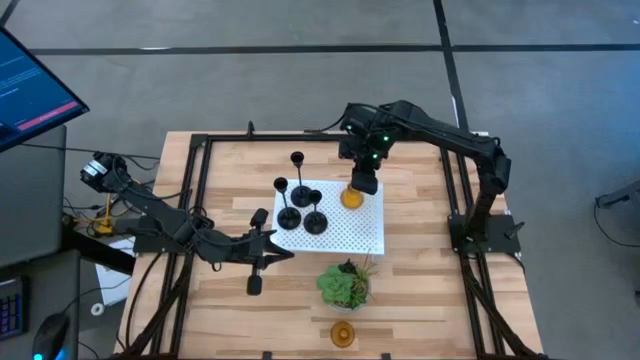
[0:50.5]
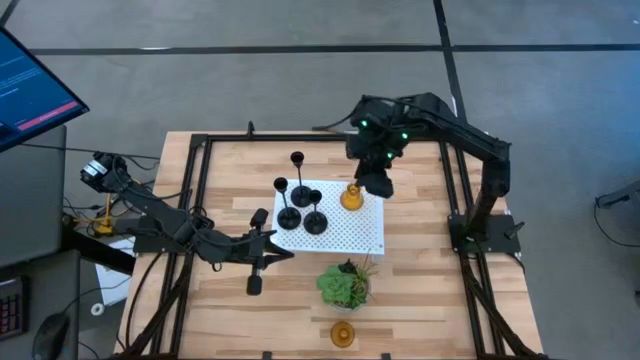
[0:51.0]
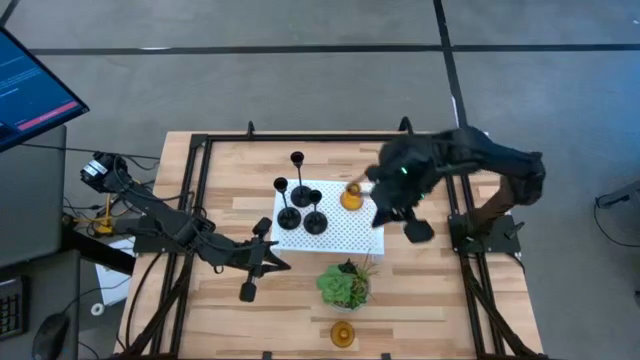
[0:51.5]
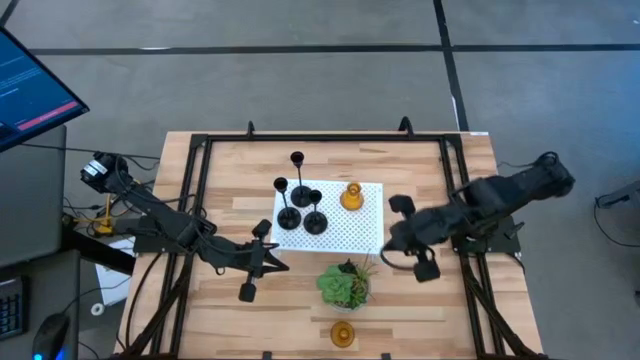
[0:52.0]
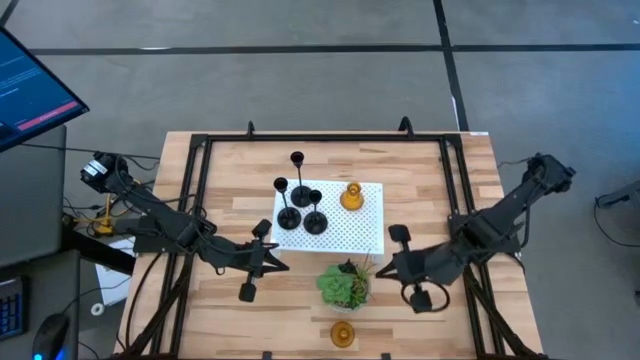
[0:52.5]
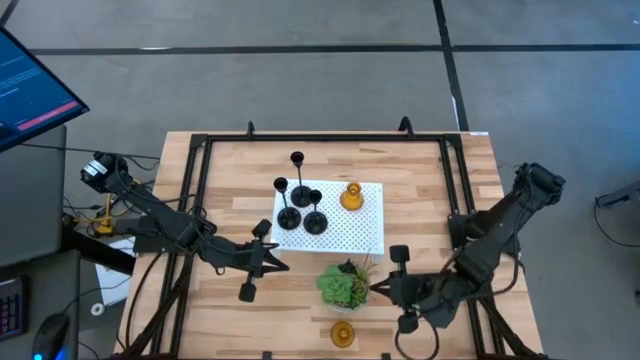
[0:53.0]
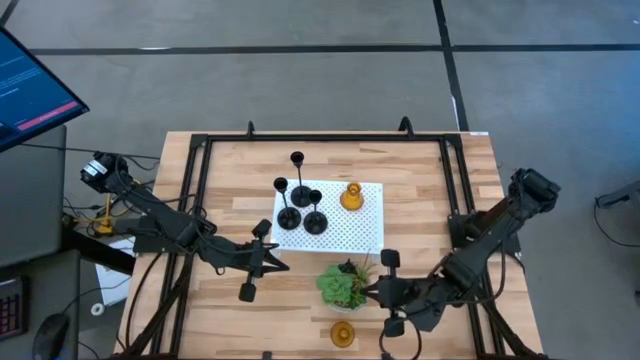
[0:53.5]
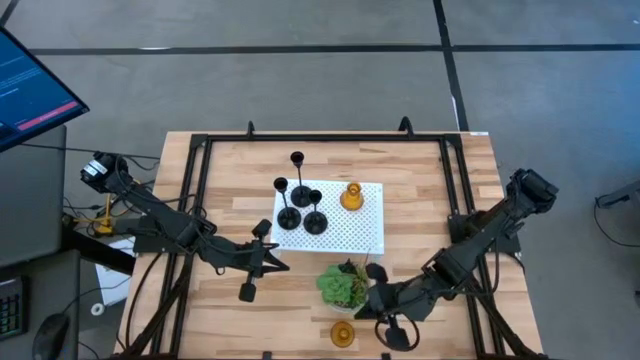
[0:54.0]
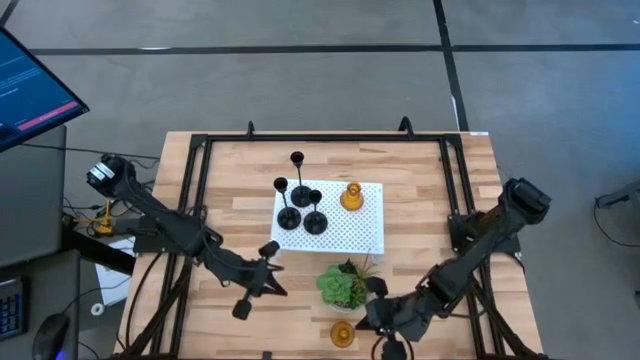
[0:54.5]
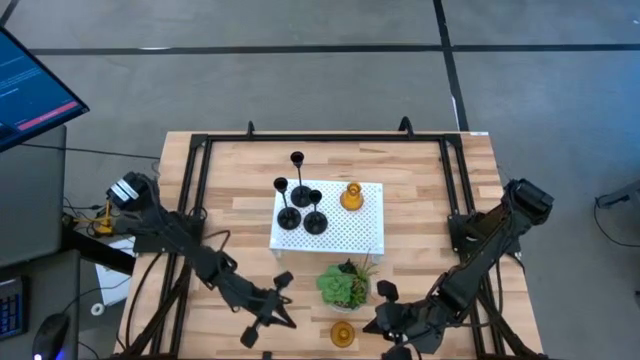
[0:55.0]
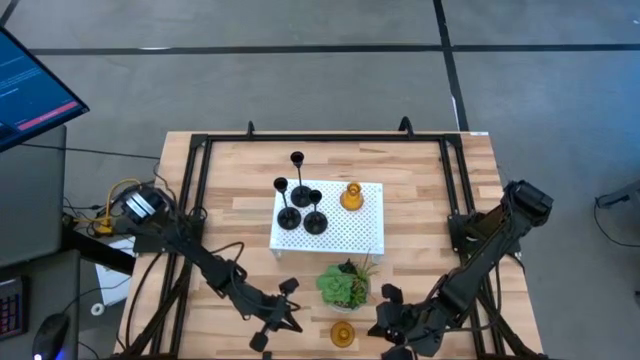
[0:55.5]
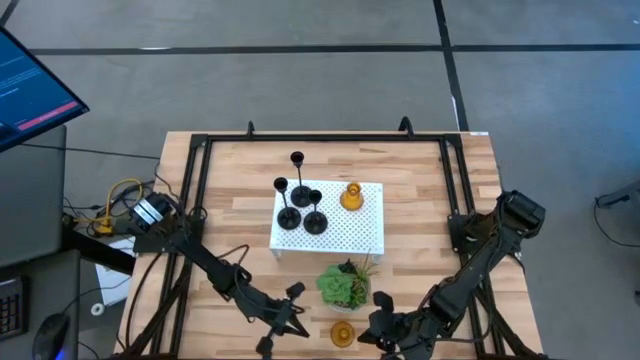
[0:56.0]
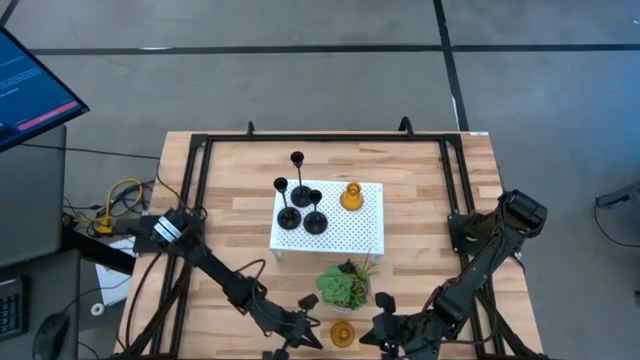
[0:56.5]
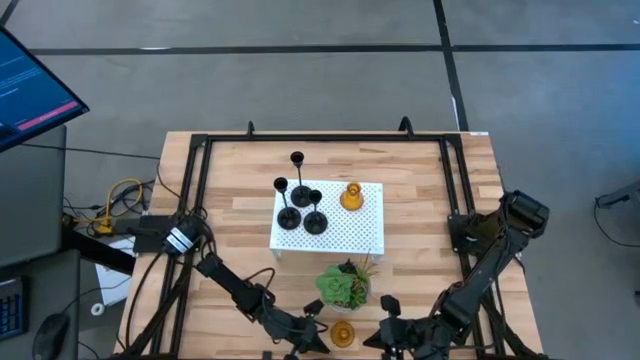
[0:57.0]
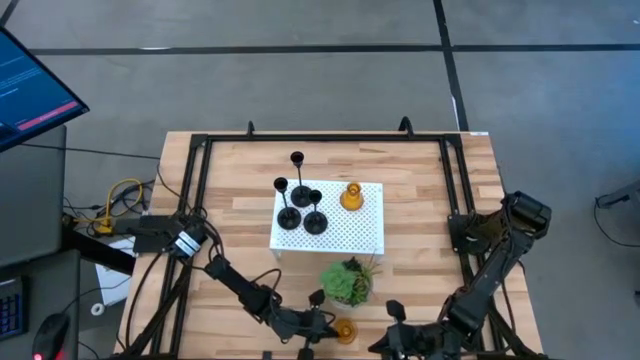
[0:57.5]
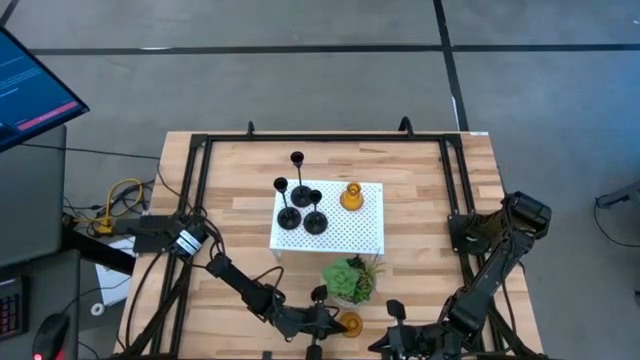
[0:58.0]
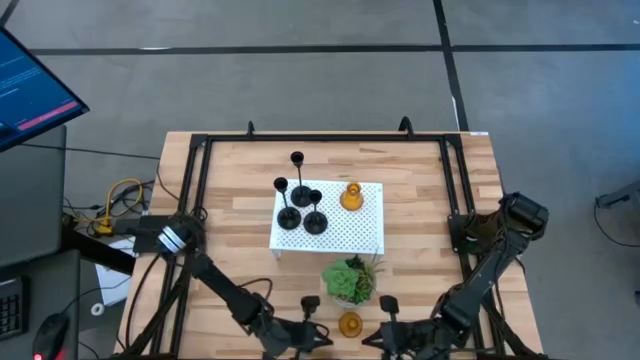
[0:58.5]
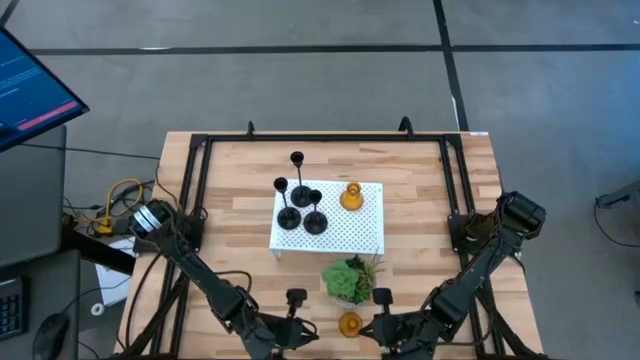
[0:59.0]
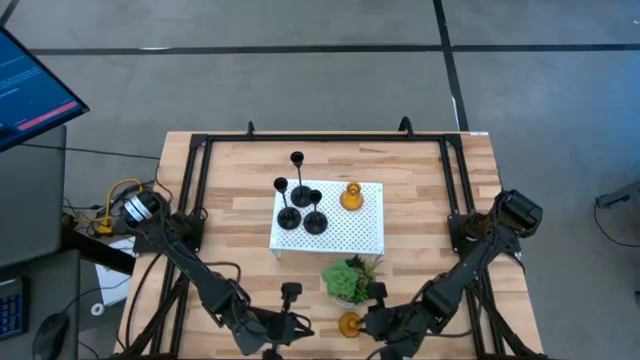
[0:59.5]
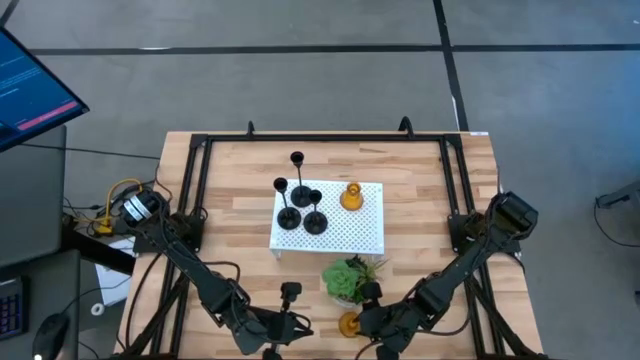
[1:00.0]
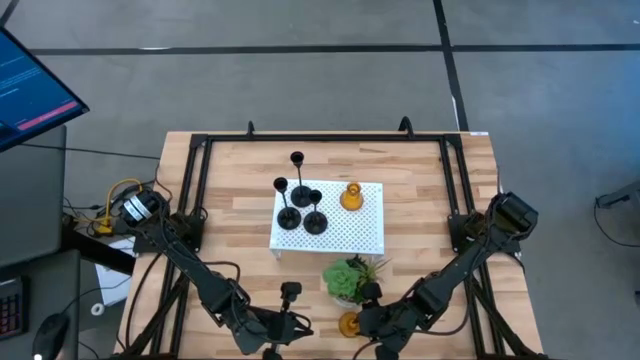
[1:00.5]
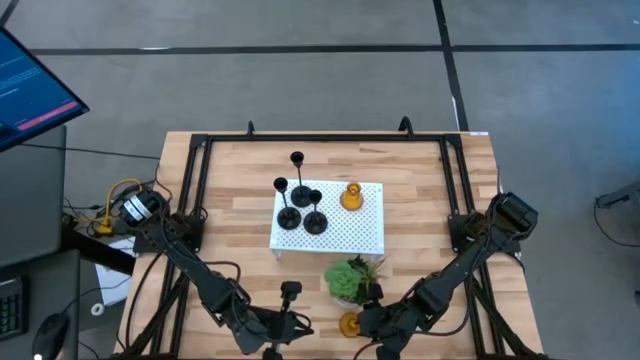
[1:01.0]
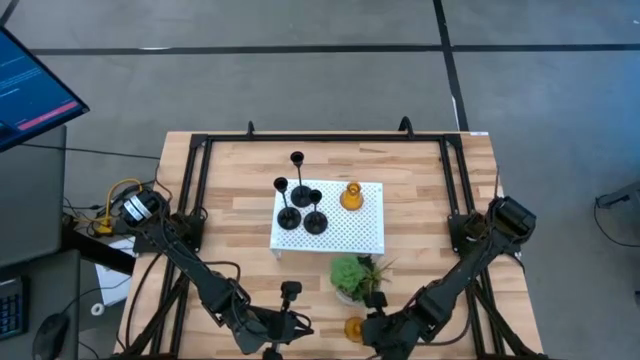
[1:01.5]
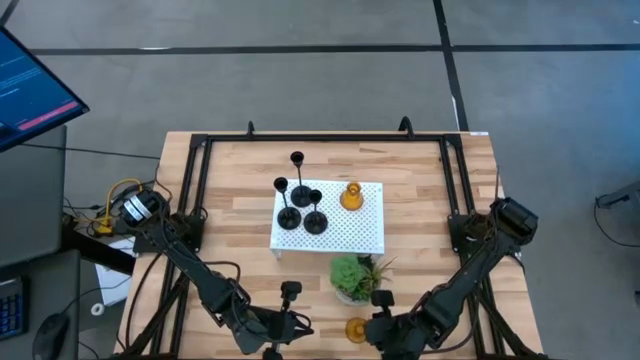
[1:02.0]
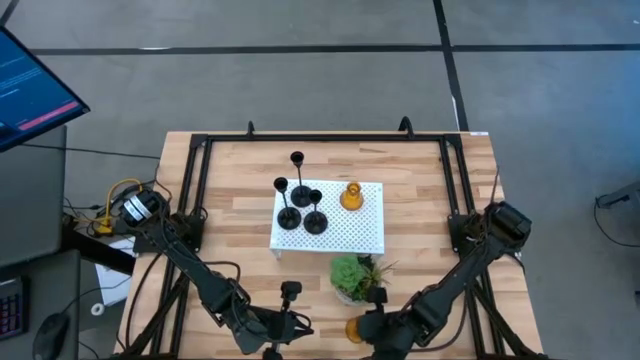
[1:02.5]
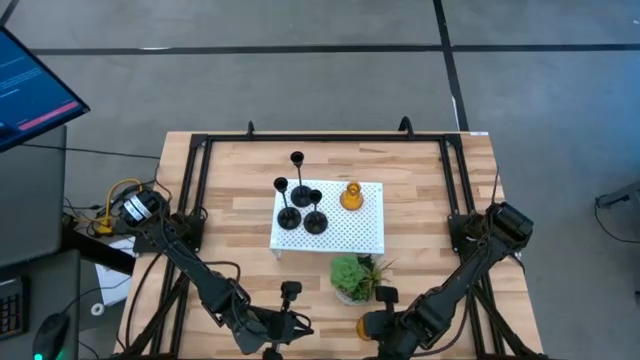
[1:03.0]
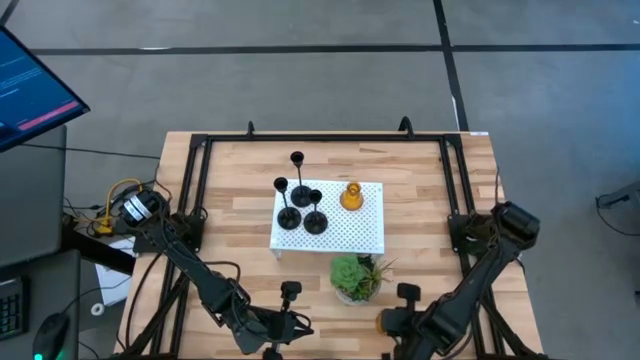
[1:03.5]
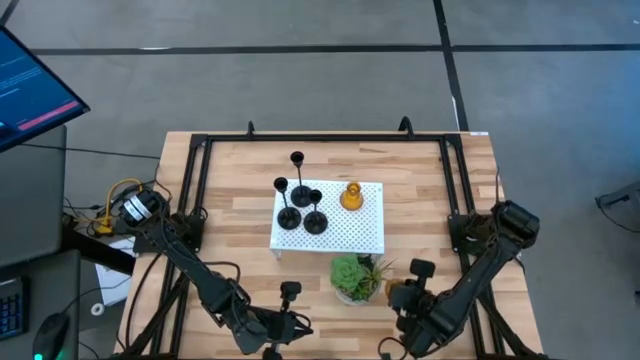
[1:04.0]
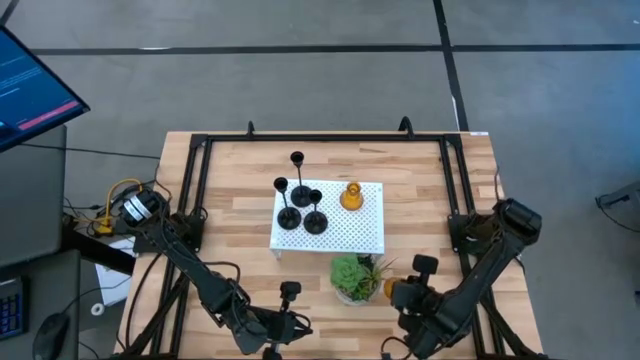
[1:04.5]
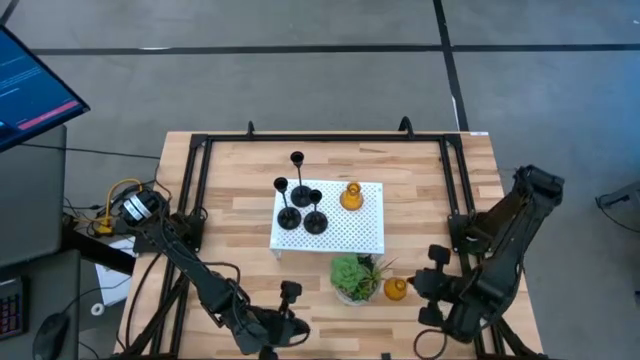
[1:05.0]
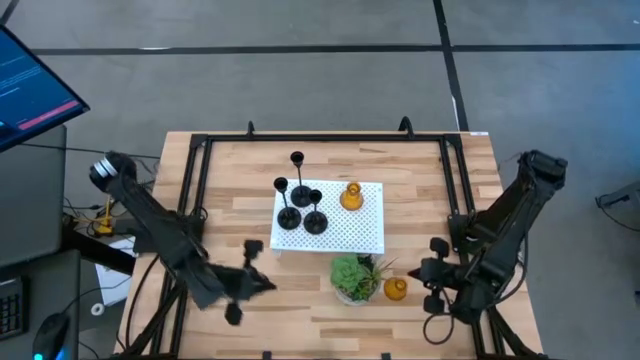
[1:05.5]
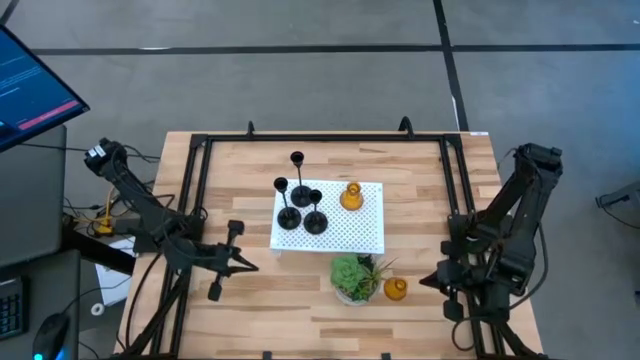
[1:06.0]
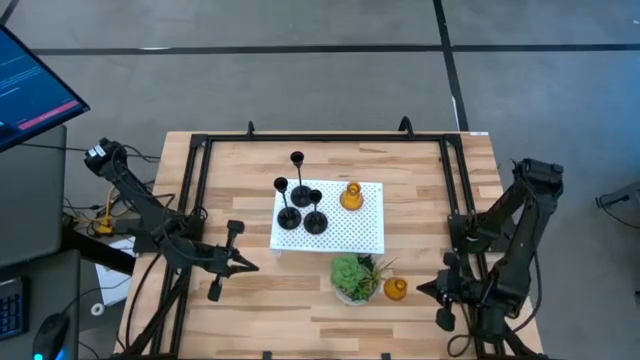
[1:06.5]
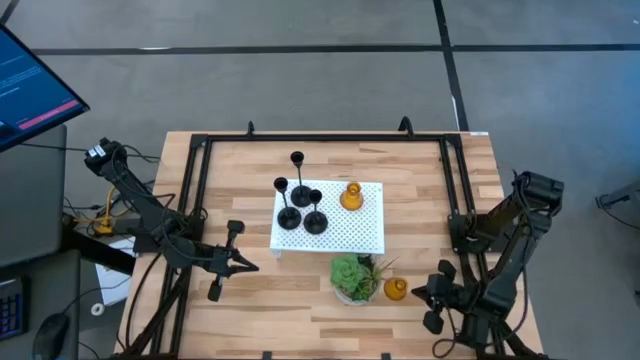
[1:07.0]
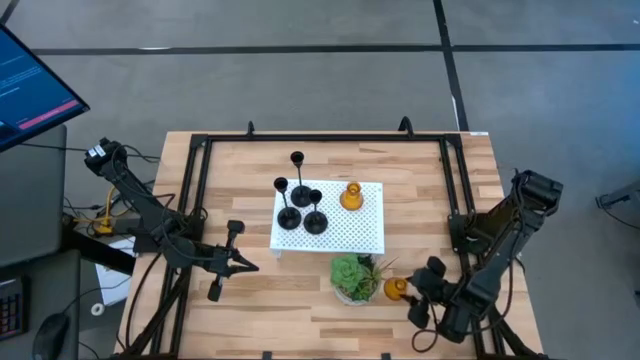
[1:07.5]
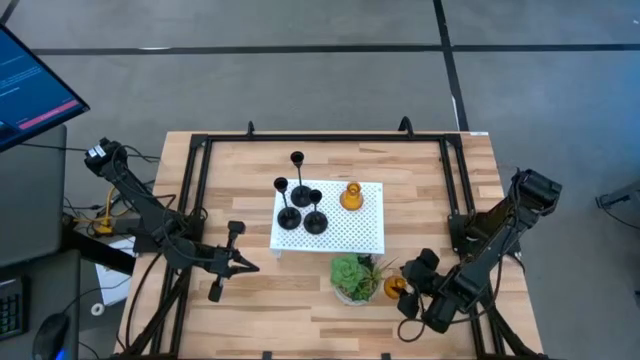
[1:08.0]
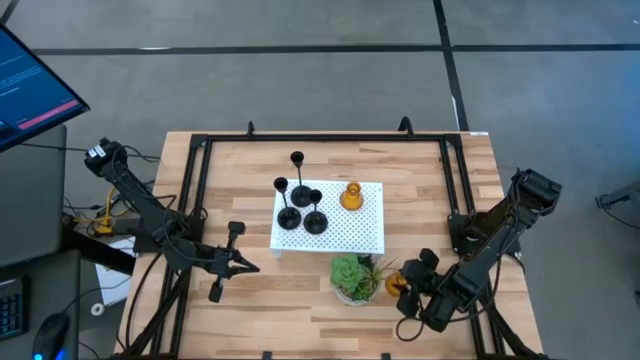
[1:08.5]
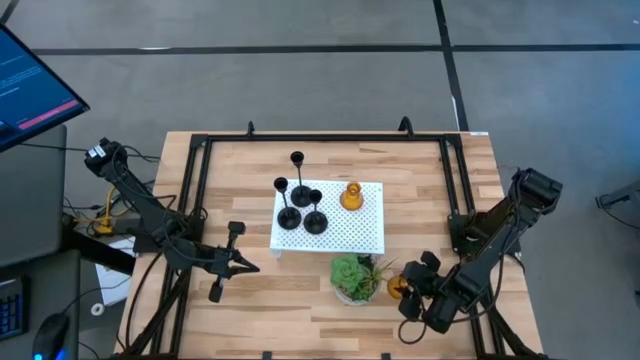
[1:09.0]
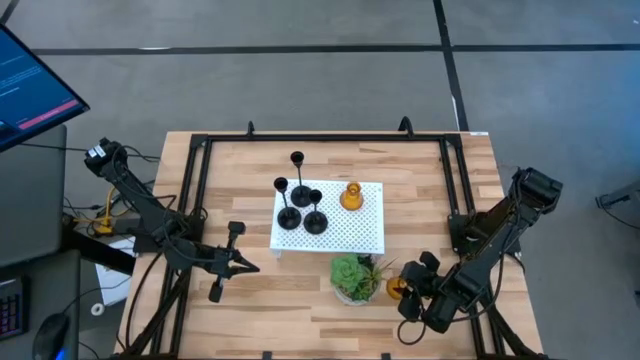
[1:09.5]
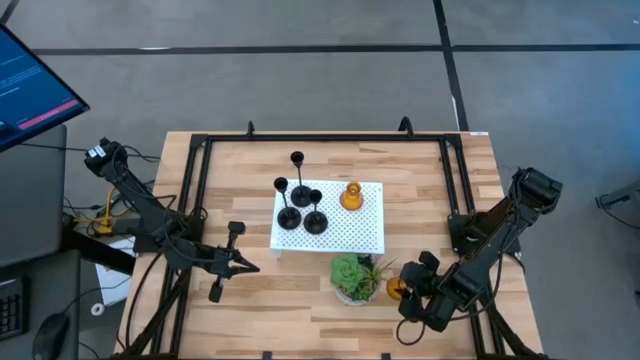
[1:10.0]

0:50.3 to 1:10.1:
Task: Pick & Place candle stick holders
Put the orange transparent candle holder on the shelf
